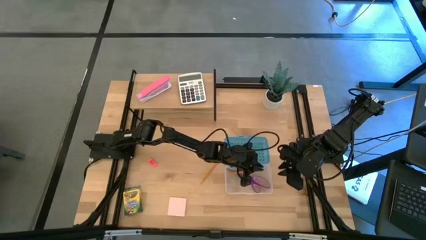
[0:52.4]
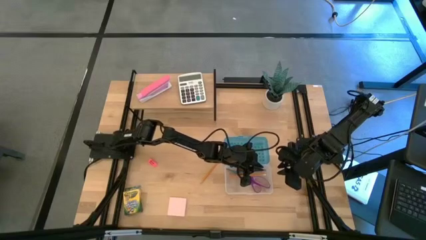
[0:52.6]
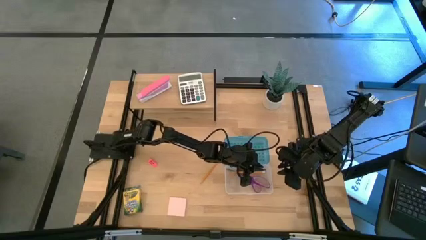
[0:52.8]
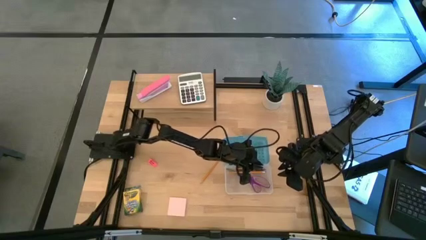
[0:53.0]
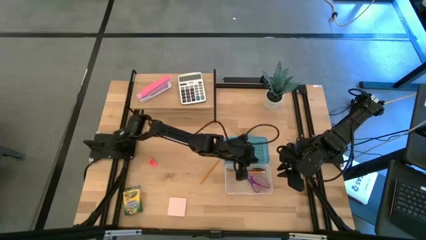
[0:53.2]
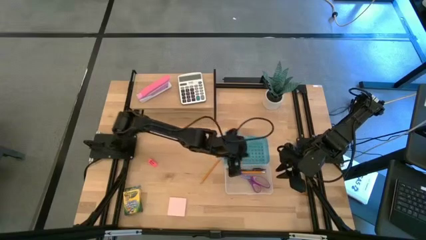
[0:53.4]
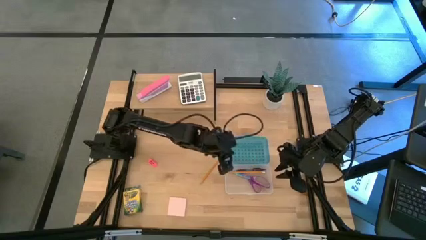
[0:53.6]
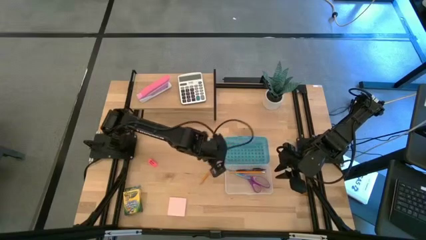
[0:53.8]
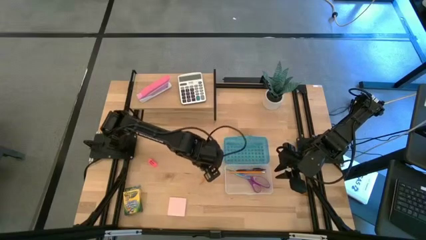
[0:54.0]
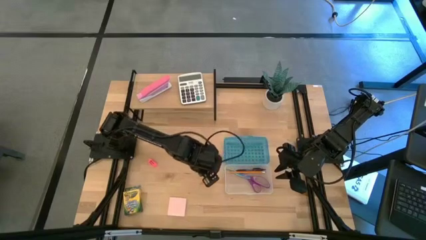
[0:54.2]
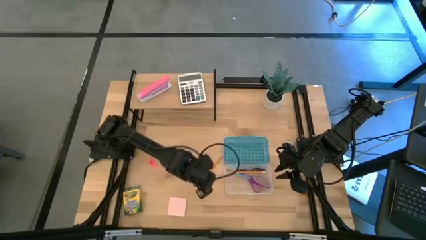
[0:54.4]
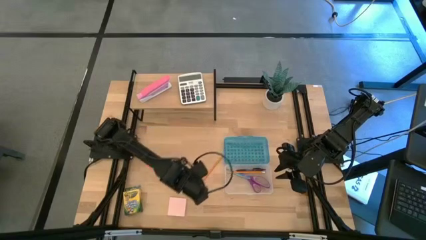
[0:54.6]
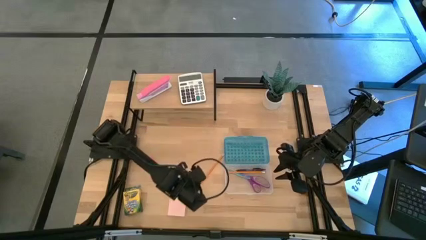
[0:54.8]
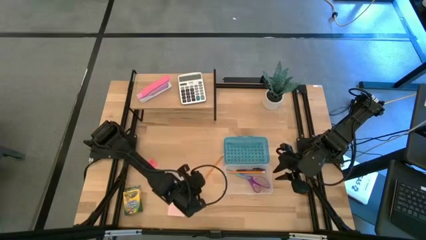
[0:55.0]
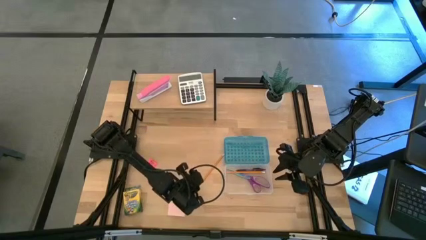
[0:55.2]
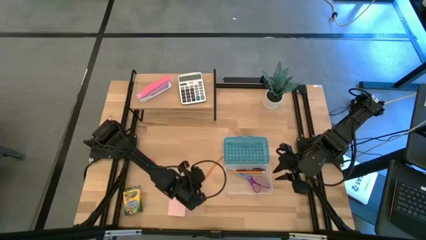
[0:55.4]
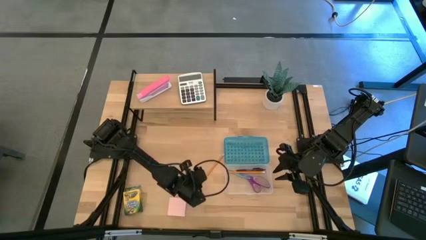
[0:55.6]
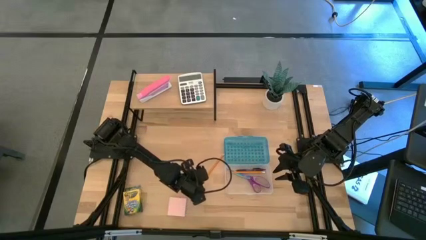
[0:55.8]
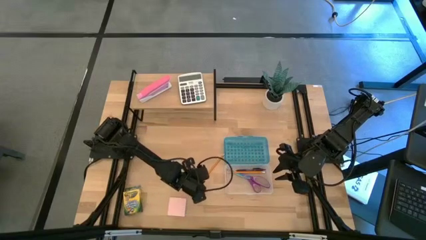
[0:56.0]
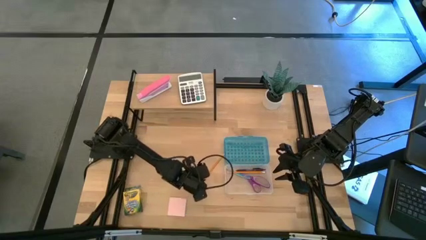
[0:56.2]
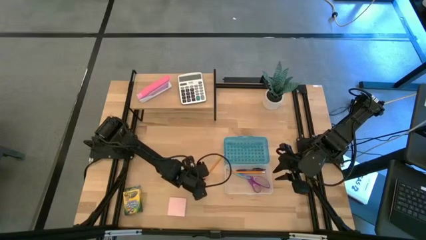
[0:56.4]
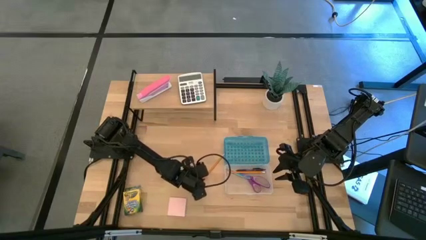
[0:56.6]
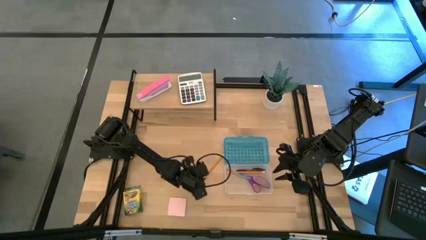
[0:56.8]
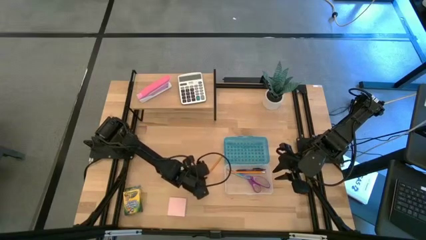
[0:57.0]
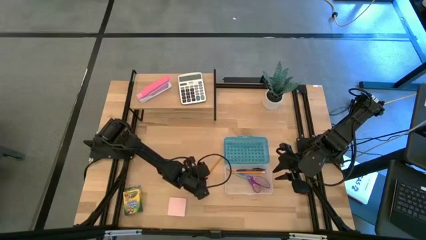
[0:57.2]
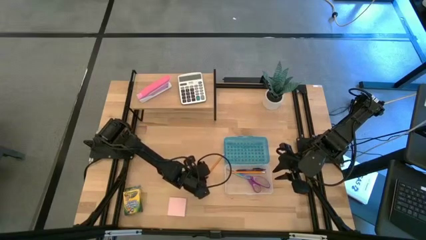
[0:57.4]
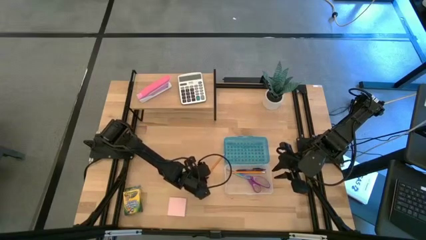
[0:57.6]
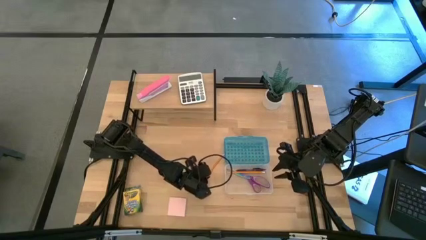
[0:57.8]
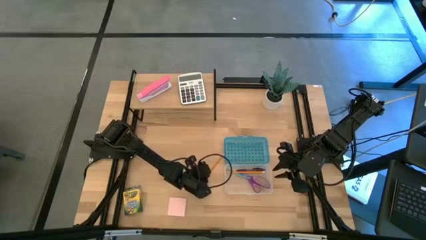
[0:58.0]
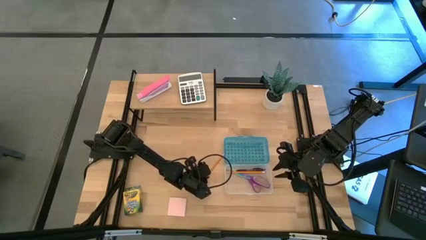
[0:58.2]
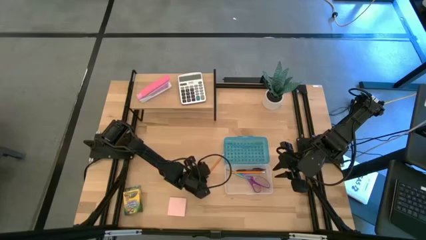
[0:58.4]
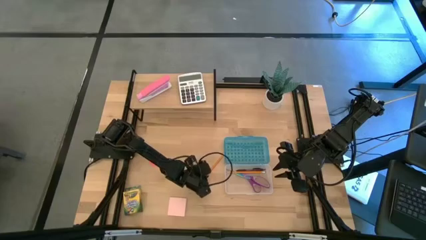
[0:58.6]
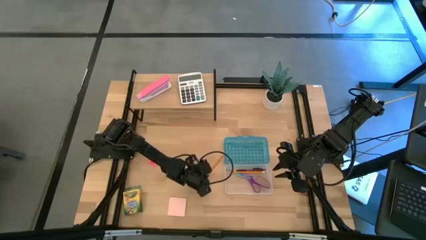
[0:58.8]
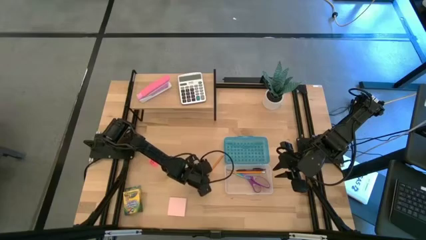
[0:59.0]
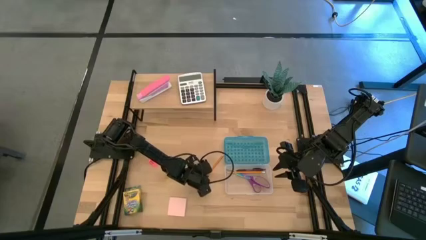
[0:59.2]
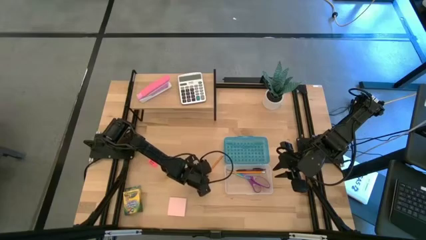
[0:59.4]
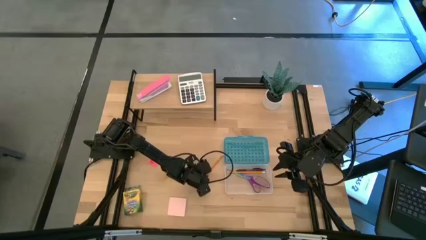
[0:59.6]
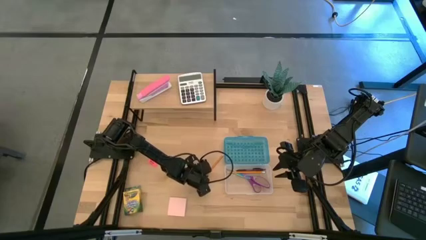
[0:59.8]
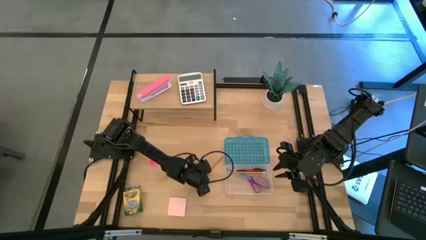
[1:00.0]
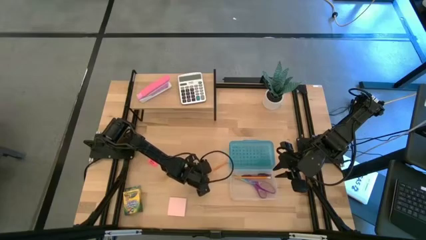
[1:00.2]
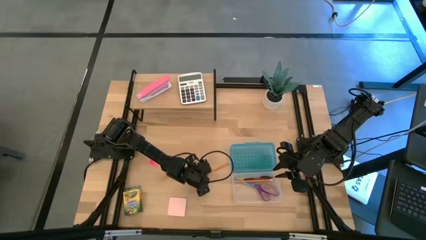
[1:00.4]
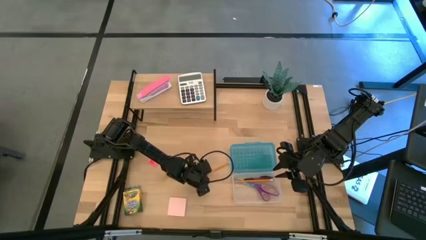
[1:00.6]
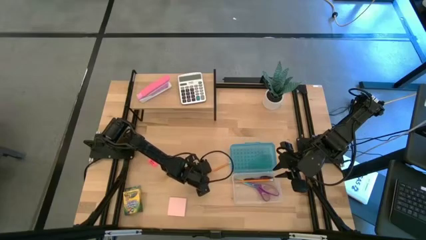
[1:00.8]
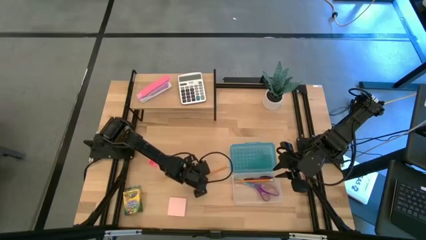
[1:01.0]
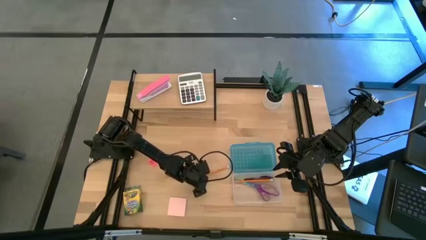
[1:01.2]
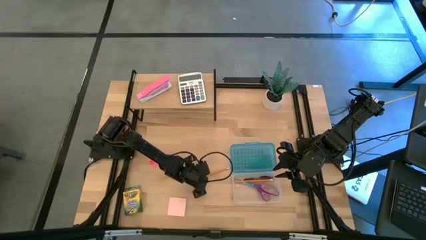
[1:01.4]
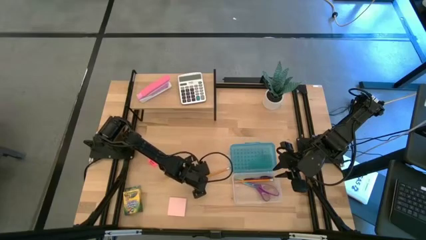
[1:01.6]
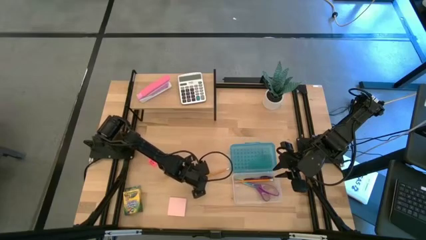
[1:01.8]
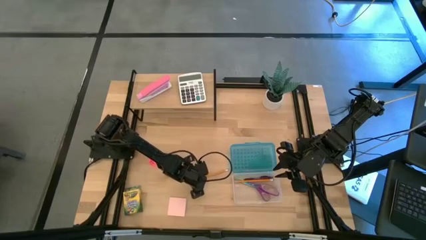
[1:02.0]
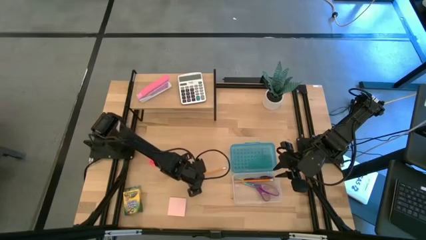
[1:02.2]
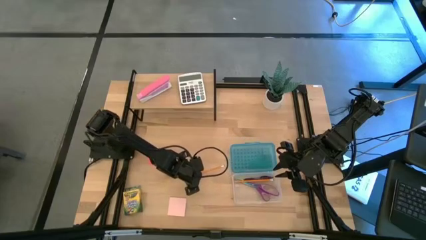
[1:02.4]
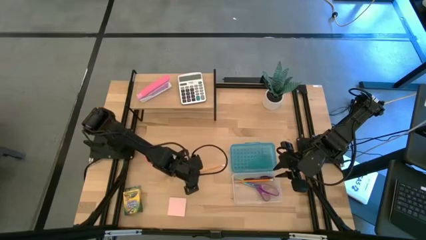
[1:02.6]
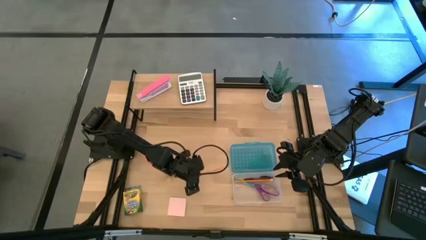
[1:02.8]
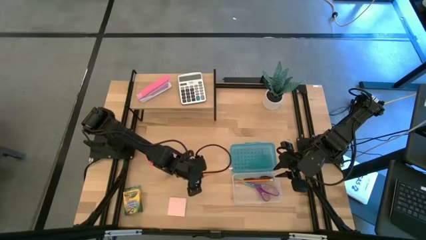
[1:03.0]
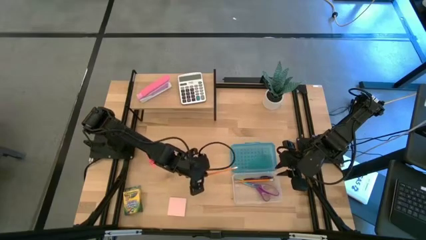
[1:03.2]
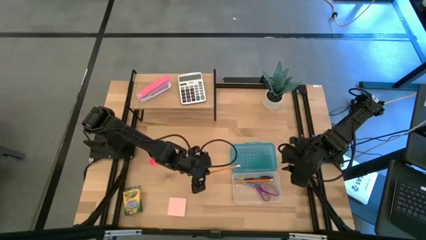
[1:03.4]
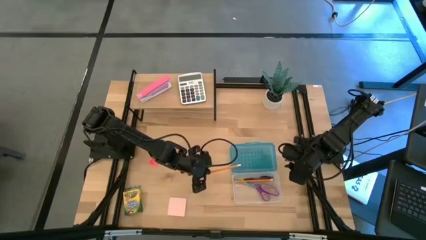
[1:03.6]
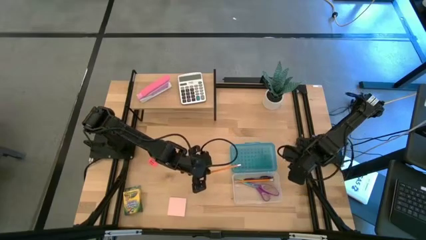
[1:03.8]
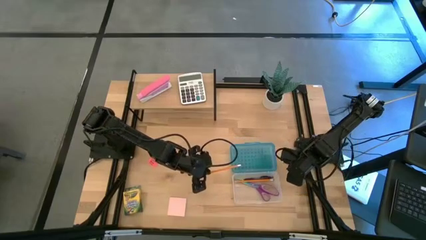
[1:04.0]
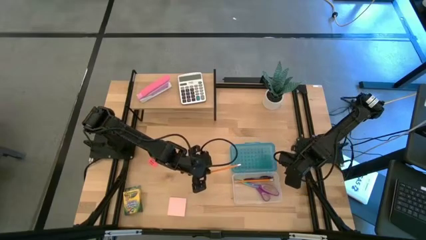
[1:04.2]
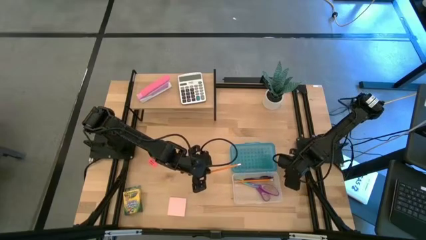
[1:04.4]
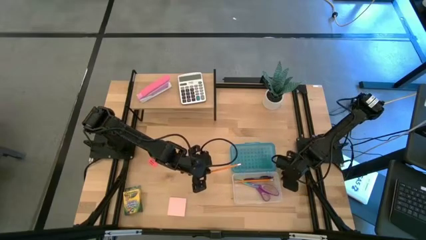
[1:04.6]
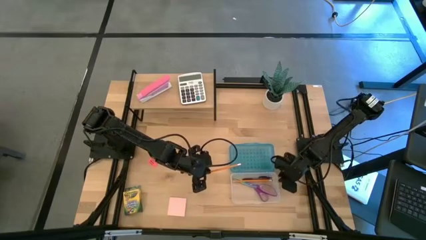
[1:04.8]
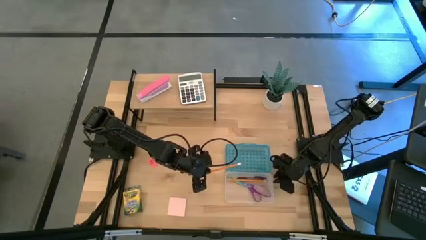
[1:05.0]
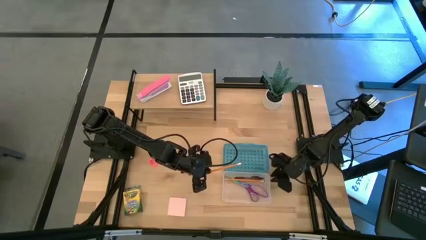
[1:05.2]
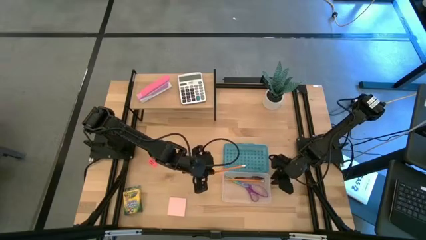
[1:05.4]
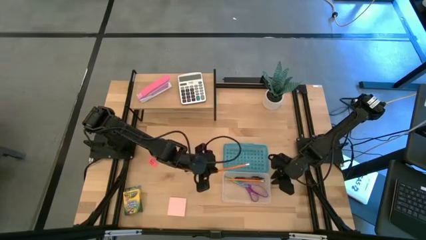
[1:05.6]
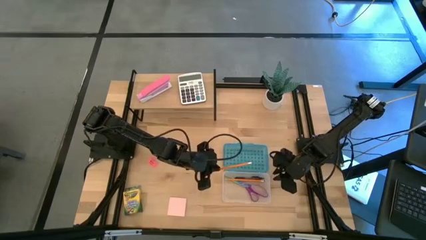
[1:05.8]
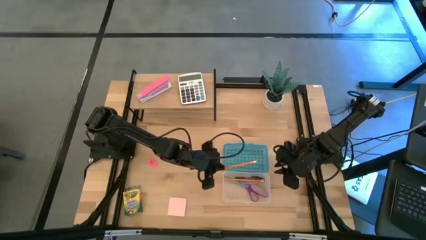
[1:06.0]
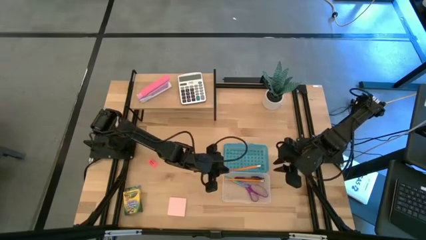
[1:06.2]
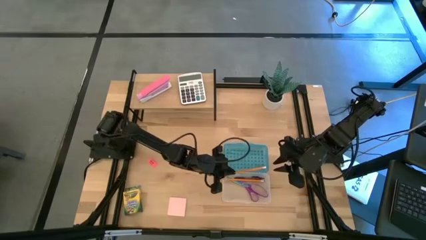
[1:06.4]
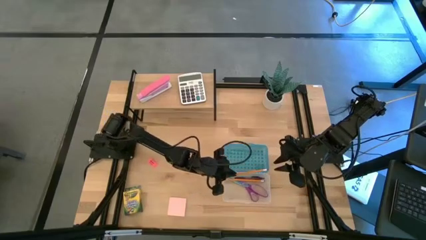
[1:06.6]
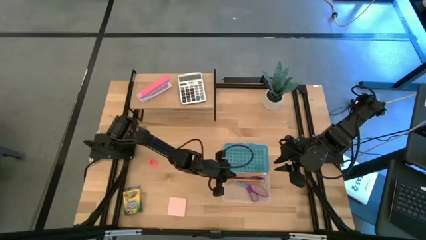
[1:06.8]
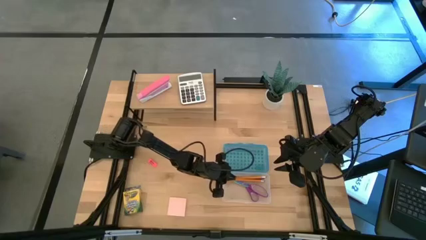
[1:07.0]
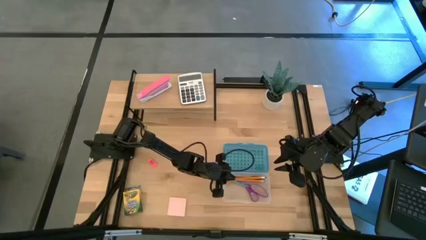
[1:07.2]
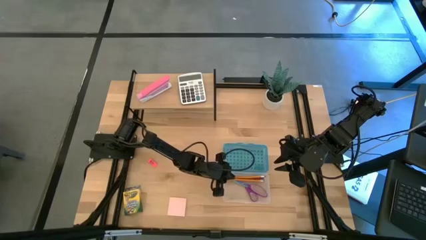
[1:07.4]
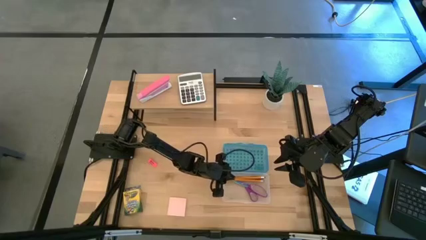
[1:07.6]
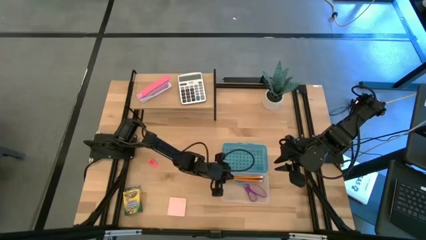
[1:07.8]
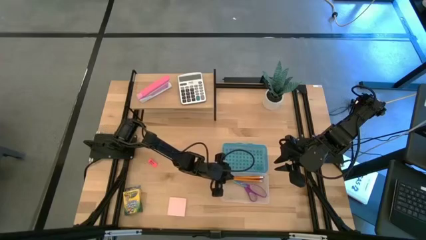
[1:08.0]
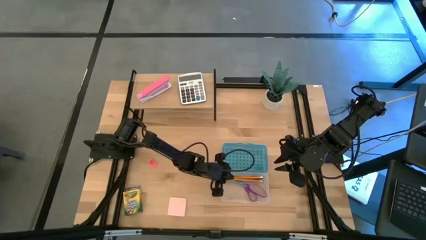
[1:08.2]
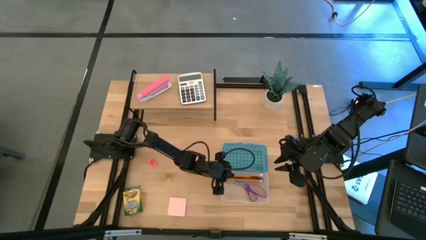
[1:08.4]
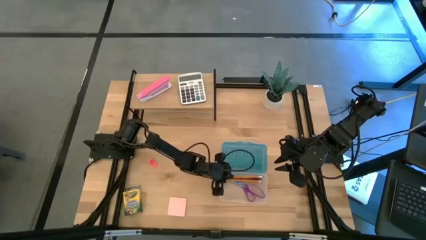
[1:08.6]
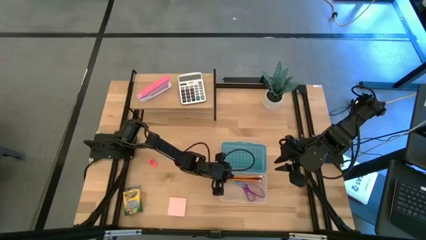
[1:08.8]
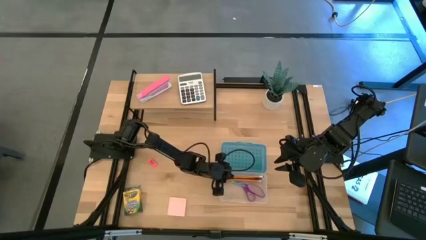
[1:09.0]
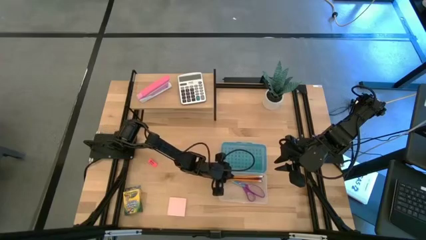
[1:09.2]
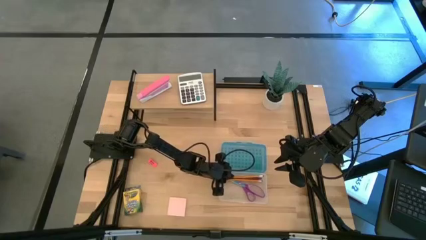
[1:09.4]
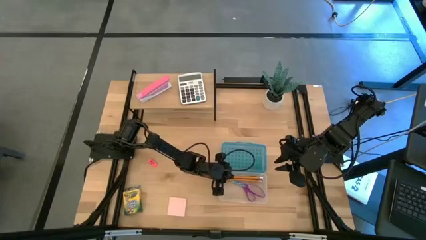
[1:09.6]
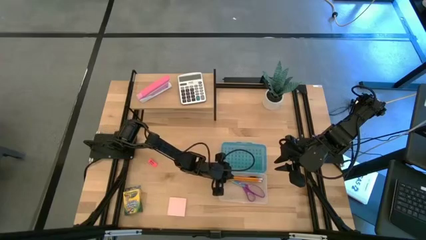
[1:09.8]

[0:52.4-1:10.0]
Task: Pack school essentials
Put the orange pencil into the blue supply box
